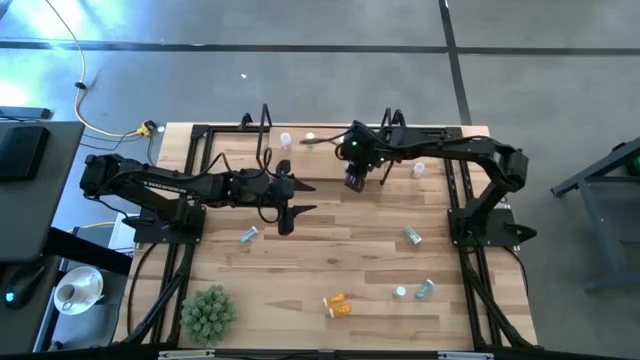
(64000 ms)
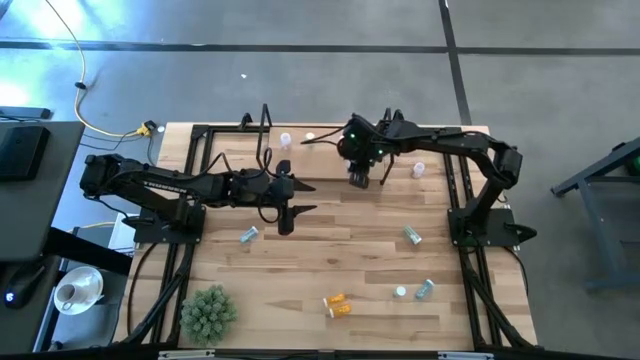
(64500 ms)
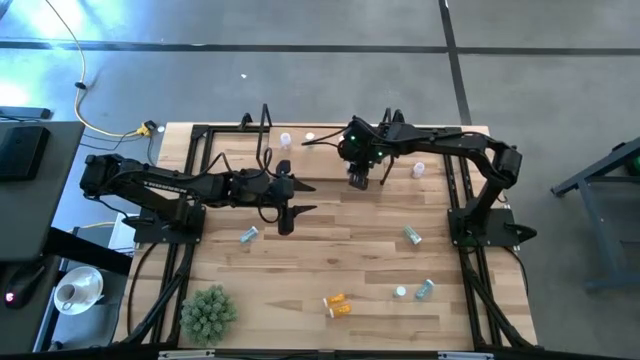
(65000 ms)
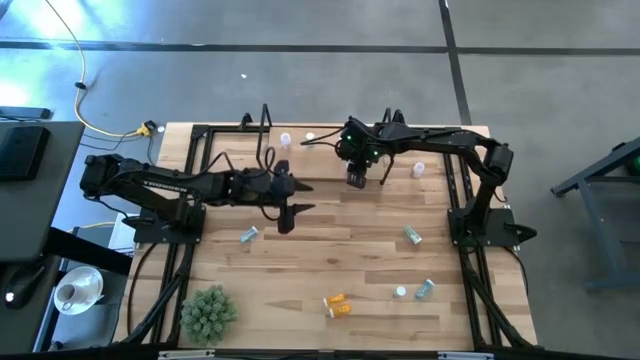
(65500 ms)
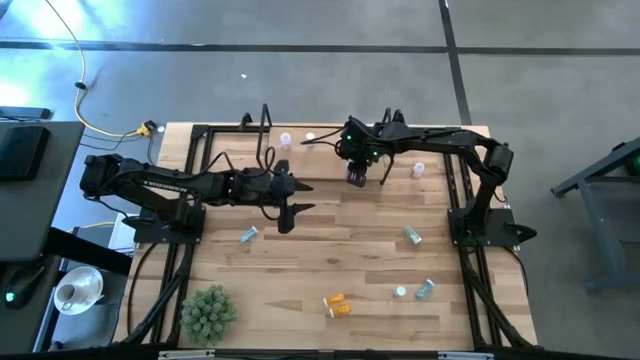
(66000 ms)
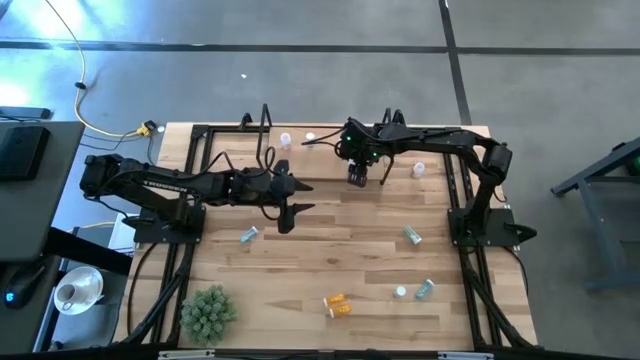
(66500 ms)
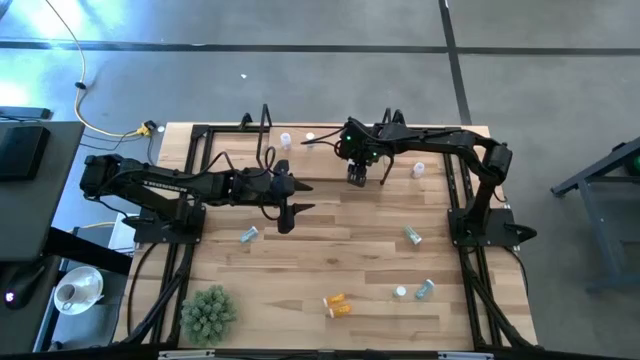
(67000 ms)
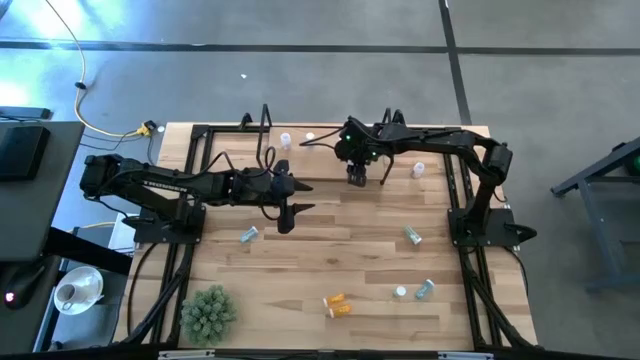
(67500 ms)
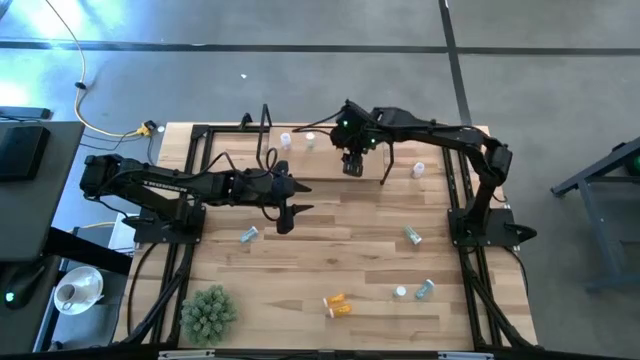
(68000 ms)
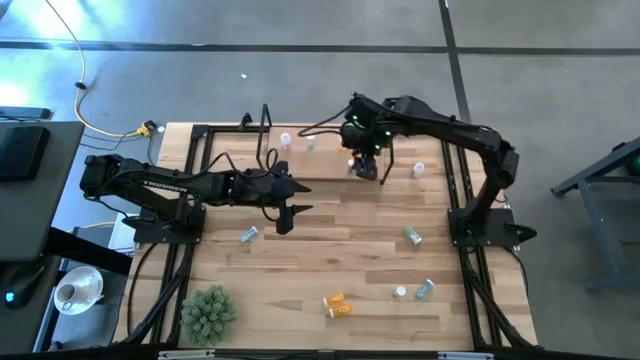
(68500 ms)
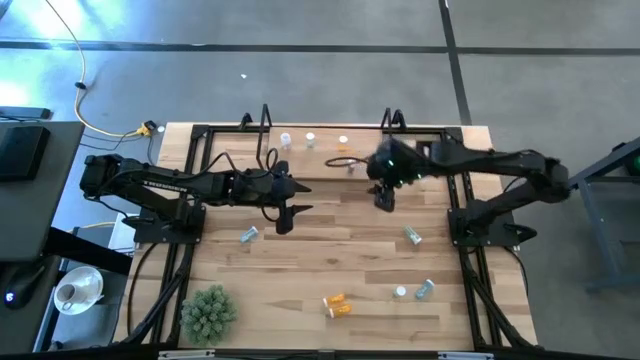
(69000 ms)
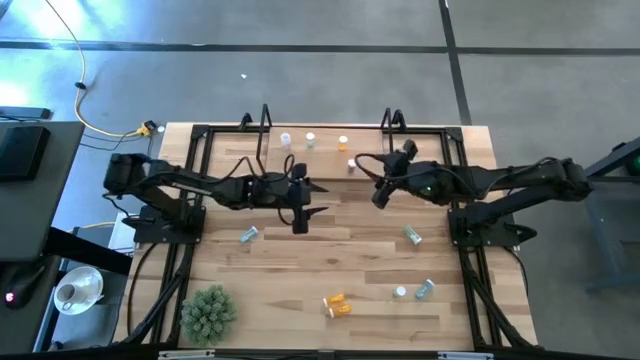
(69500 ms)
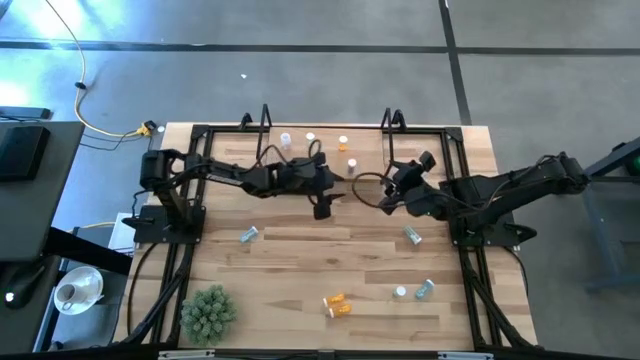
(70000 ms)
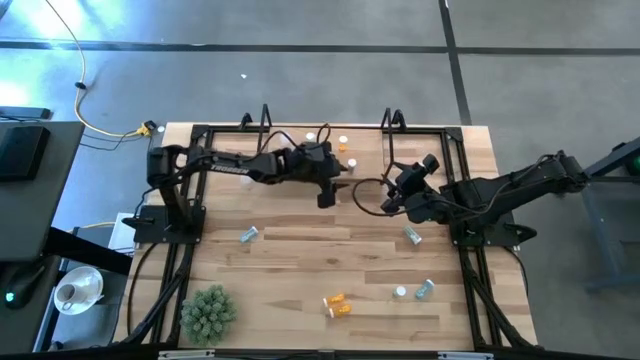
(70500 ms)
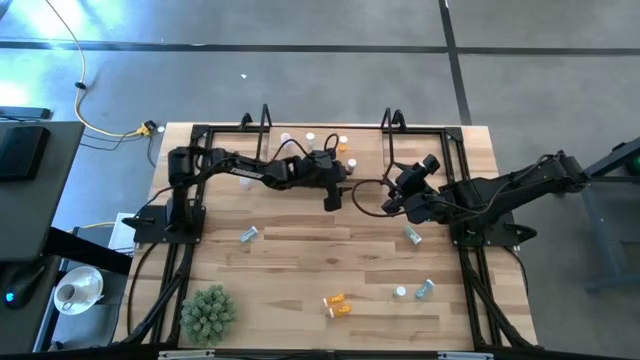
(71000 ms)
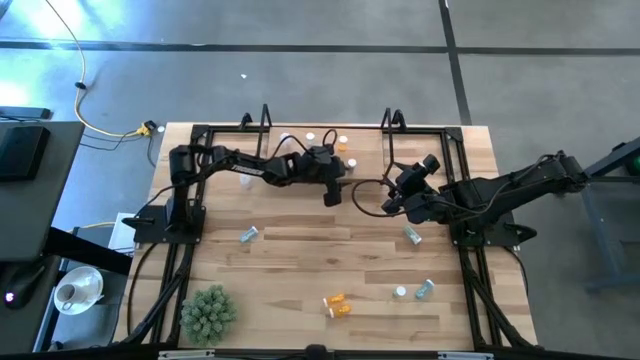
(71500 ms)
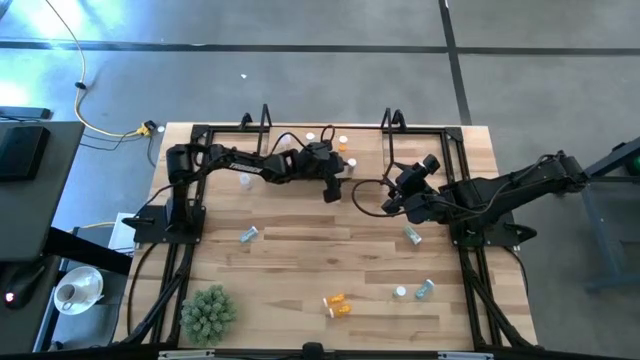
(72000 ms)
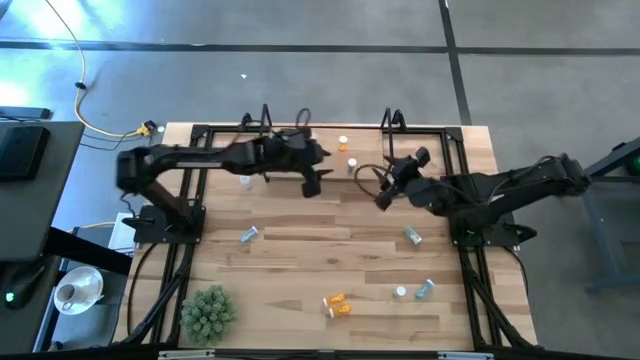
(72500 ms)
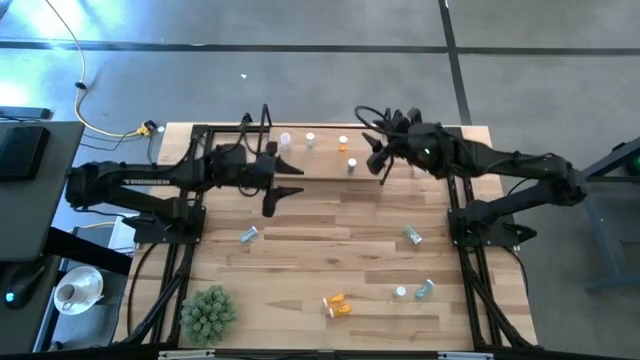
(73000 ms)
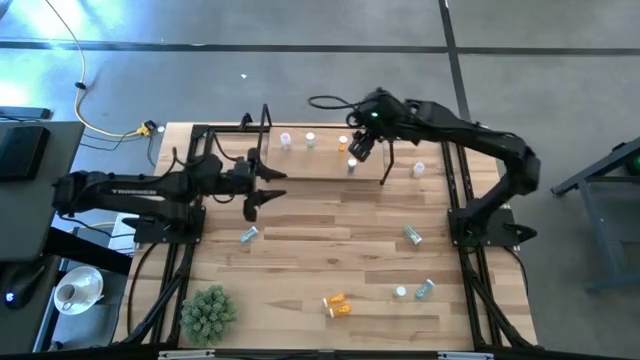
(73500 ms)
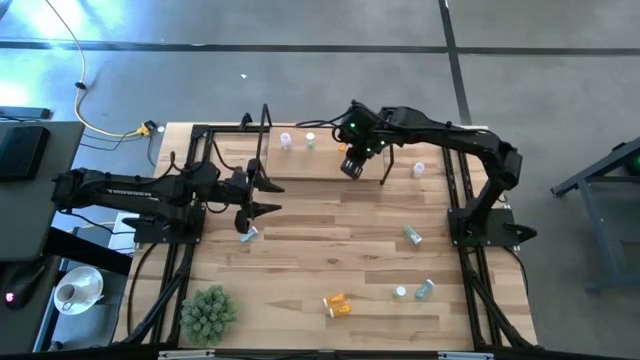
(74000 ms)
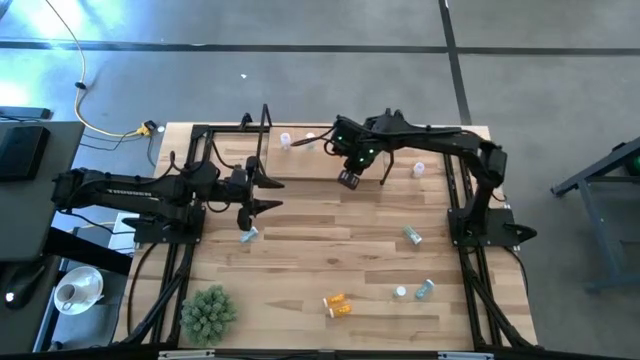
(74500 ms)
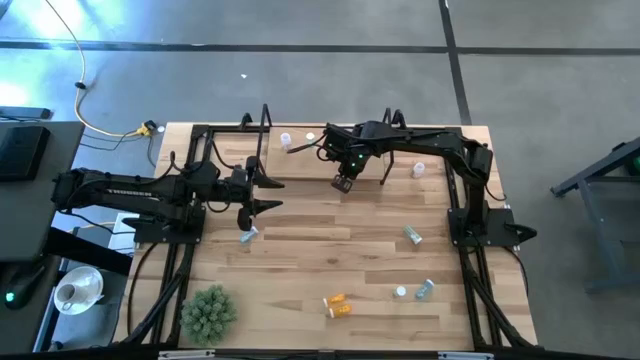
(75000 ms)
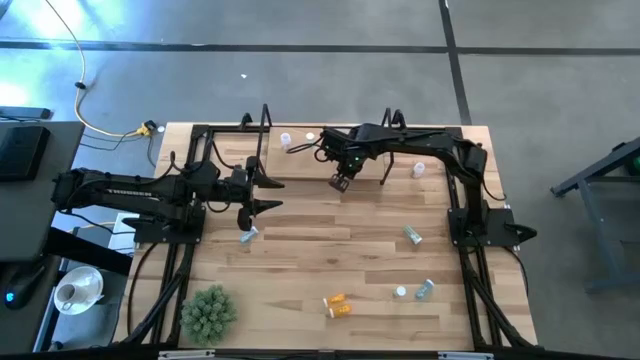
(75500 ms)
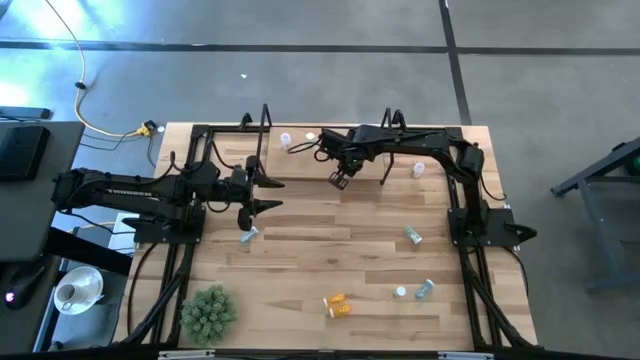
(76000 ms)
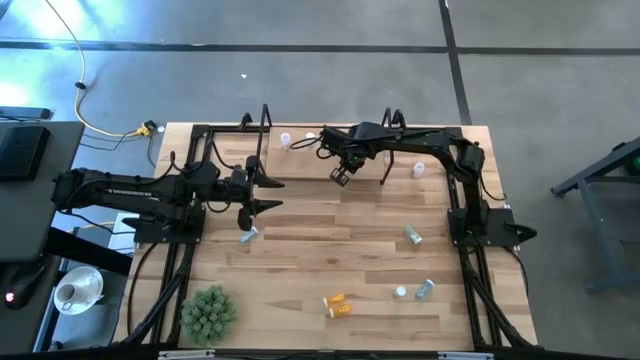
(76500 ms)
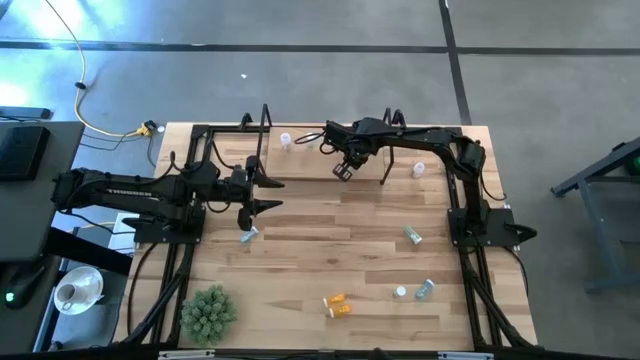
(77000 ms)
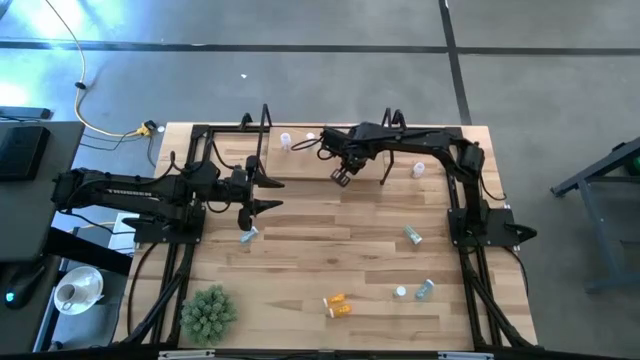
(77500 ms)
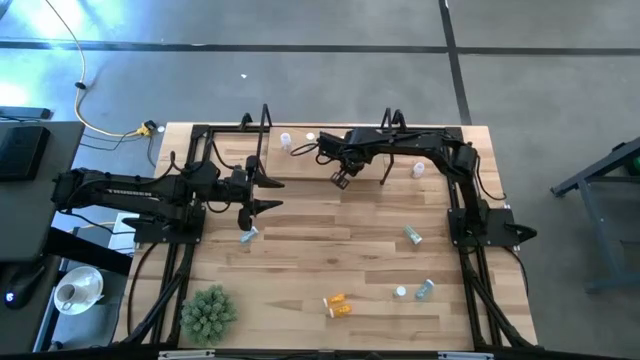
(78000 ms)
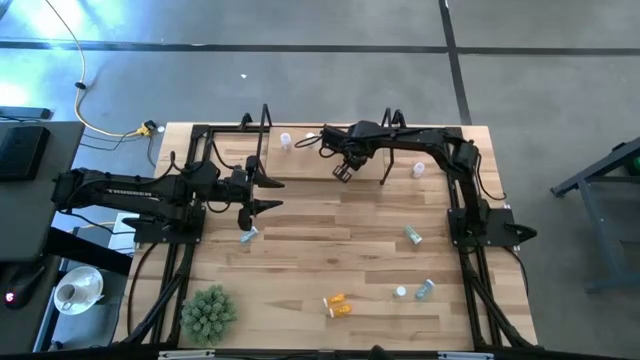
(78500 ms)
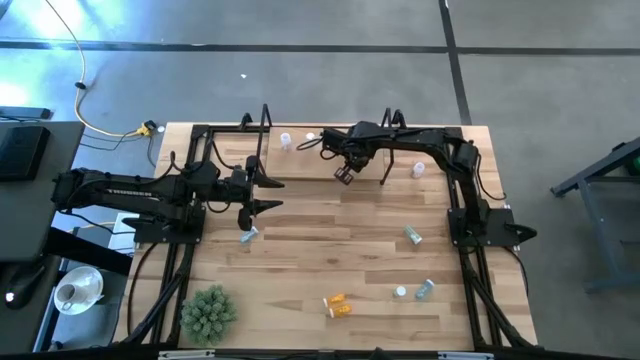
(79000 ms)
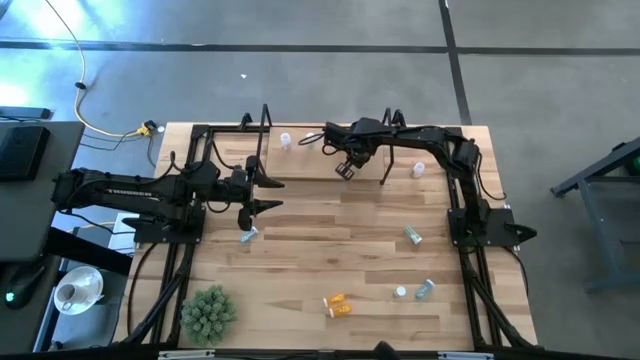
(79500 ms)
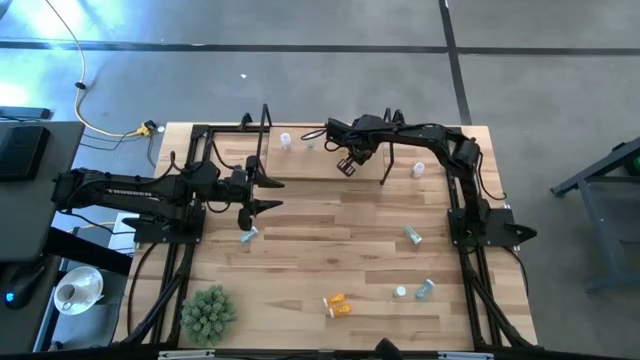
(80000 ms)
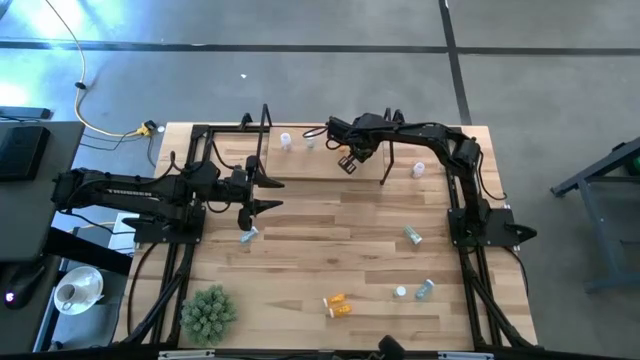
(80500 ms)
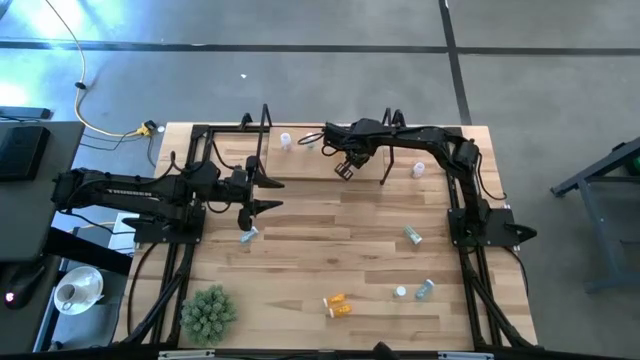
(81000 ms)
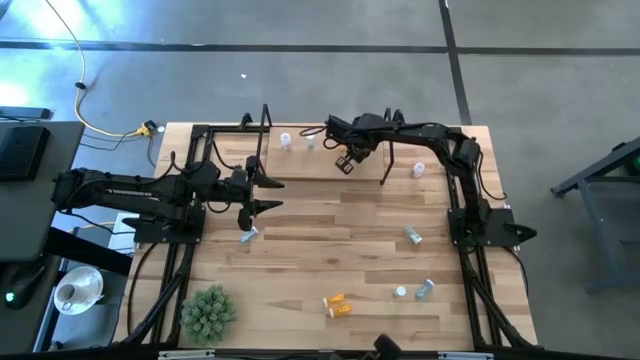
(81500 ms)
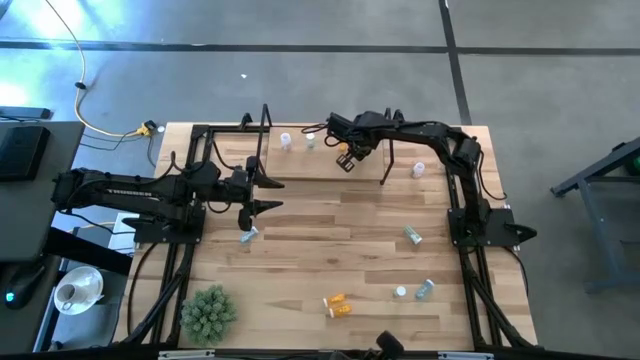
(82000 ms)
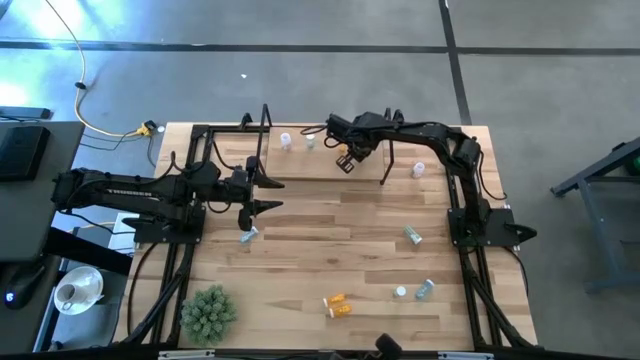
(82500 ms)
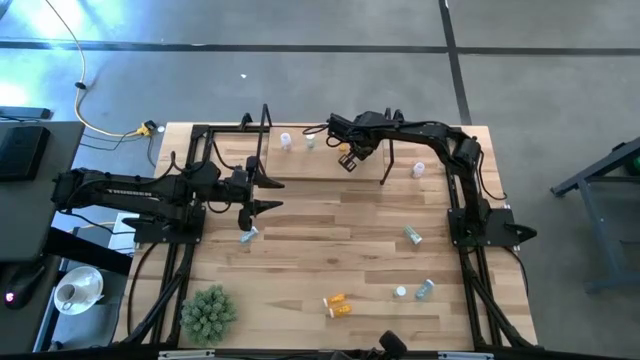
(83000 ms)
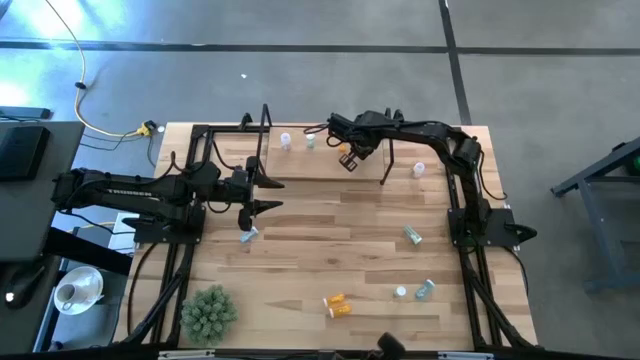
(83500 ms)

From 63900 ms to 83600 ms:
Task: Pick and place medicine bottles onto shelf by color
Put the bottom blue pill bottle on the shelf
